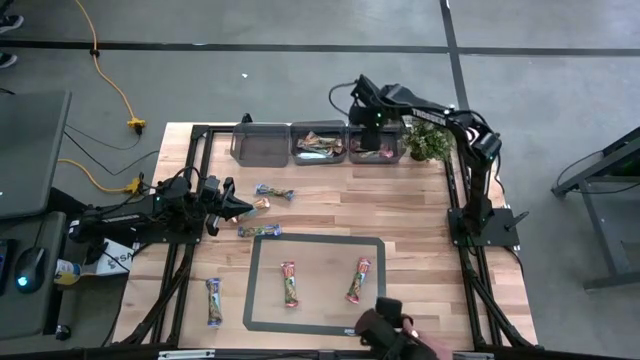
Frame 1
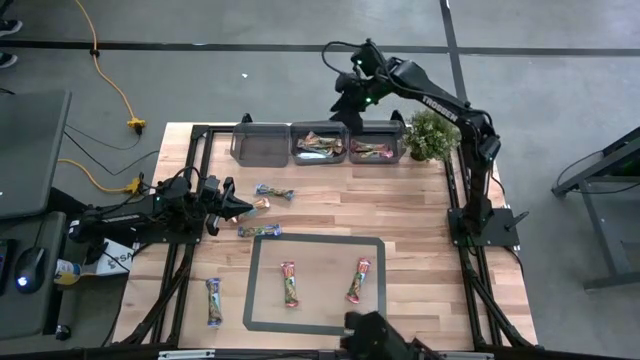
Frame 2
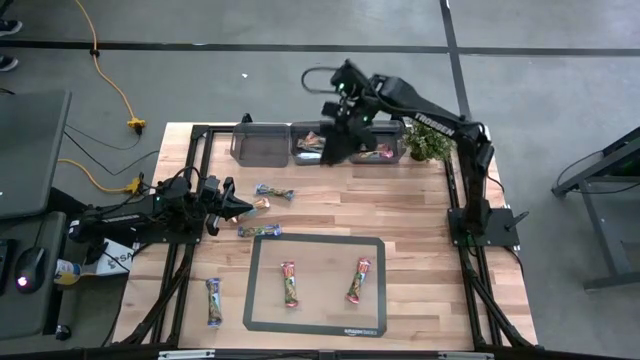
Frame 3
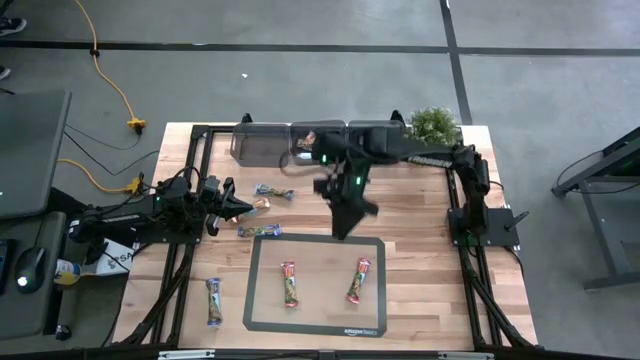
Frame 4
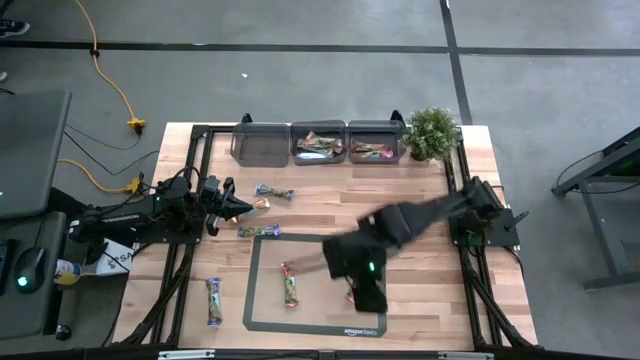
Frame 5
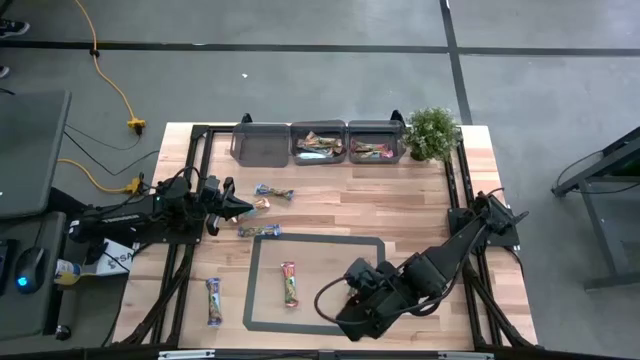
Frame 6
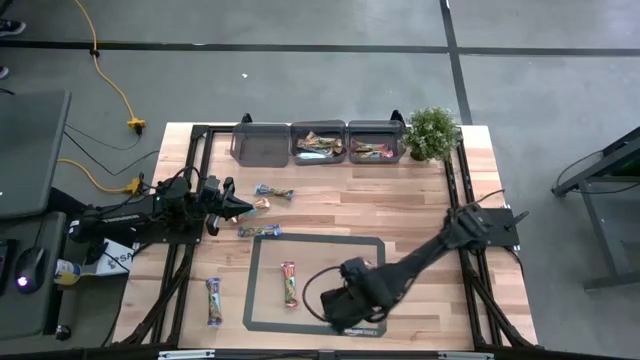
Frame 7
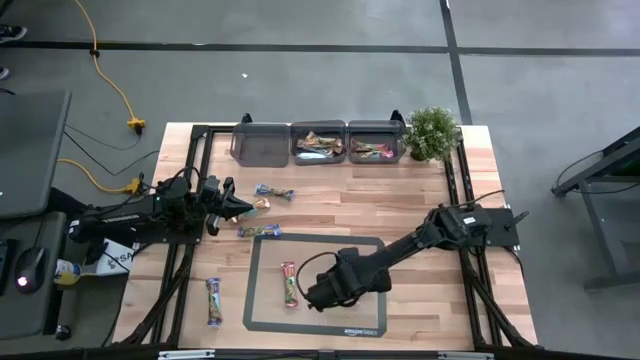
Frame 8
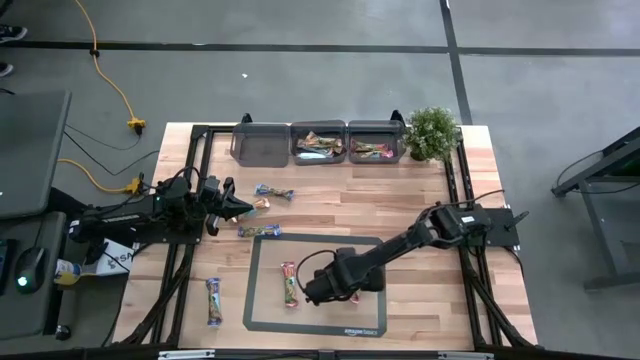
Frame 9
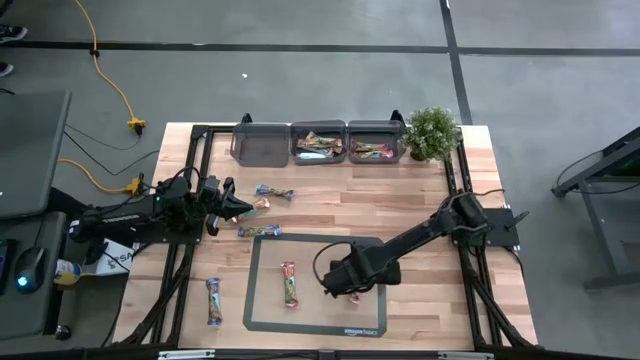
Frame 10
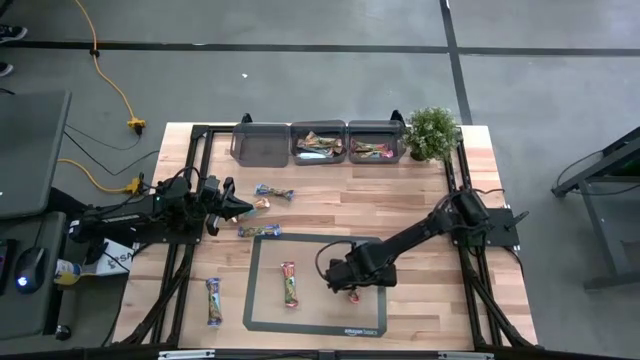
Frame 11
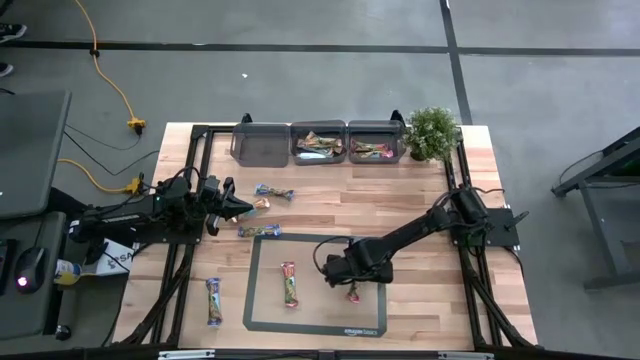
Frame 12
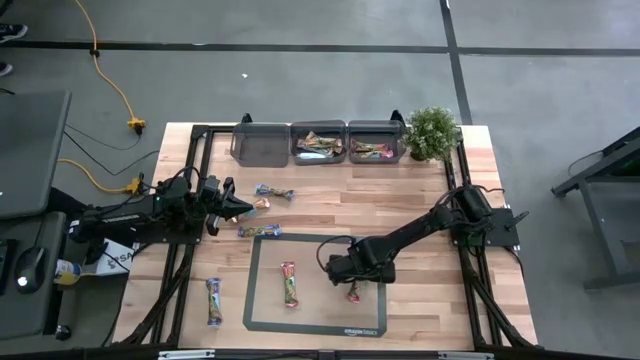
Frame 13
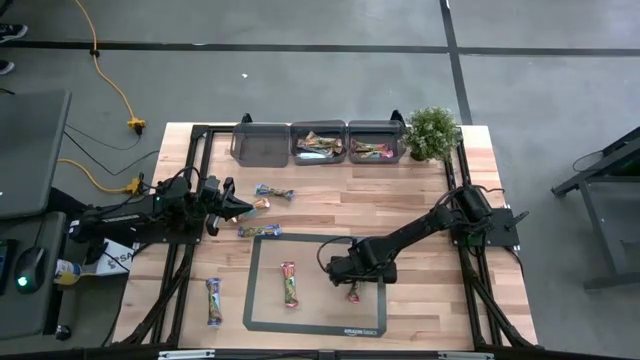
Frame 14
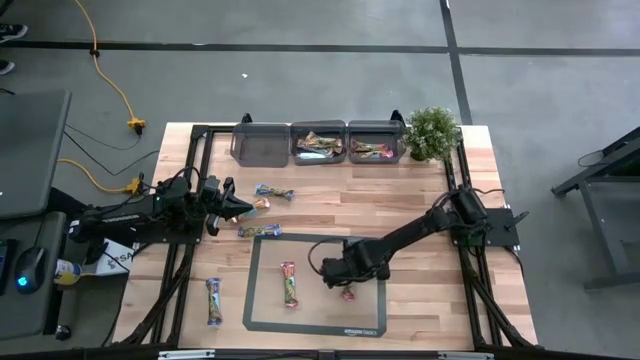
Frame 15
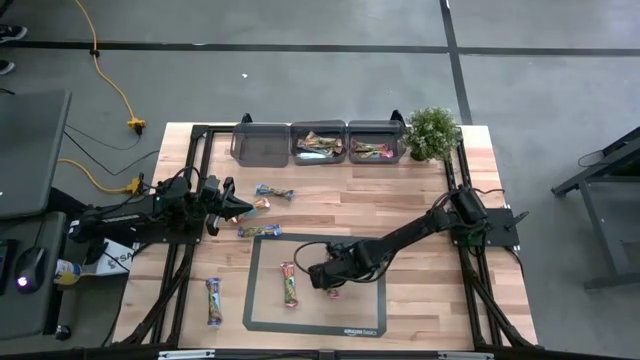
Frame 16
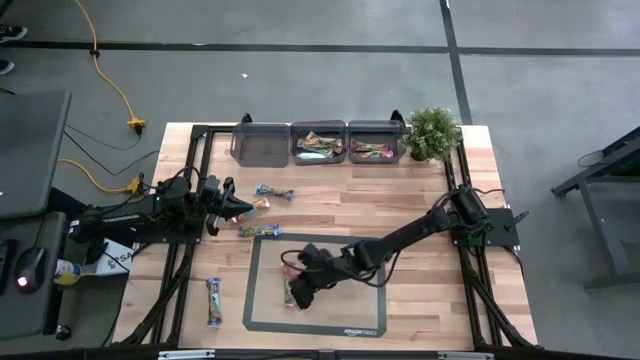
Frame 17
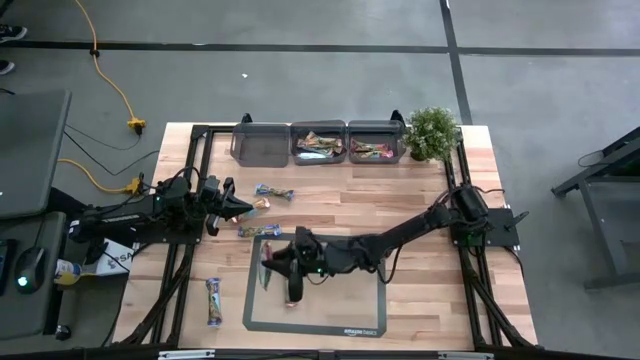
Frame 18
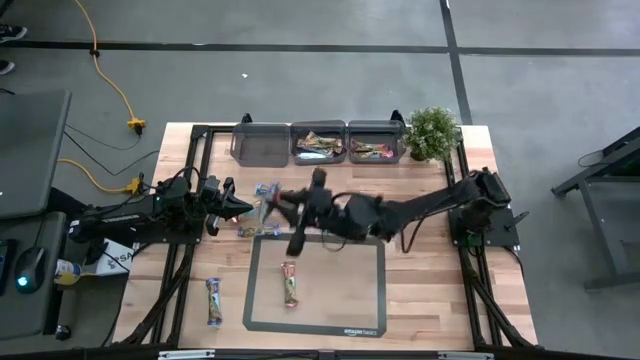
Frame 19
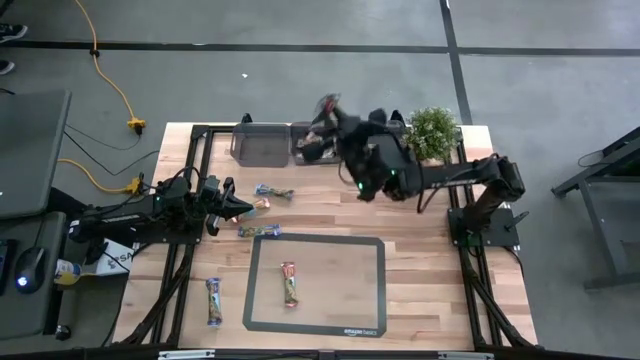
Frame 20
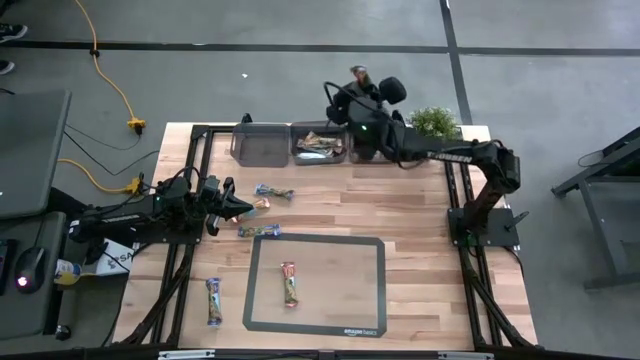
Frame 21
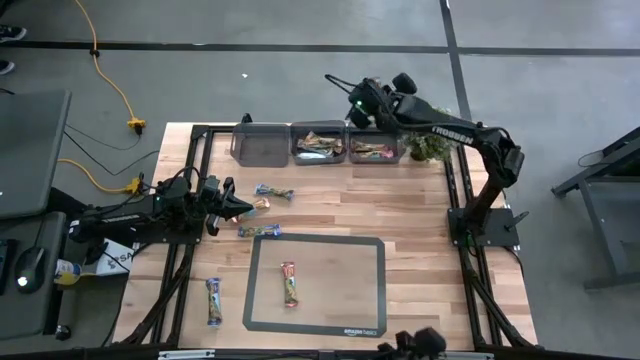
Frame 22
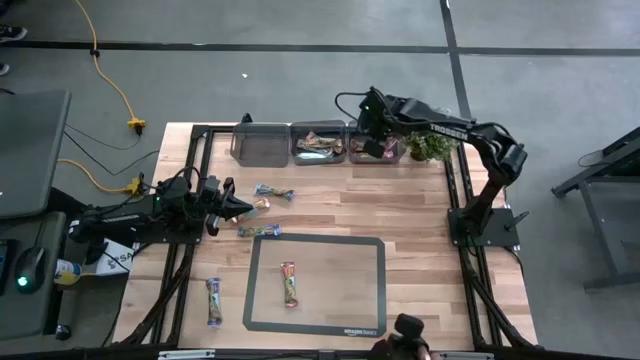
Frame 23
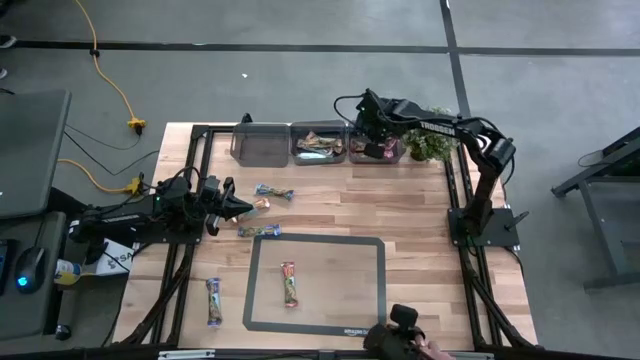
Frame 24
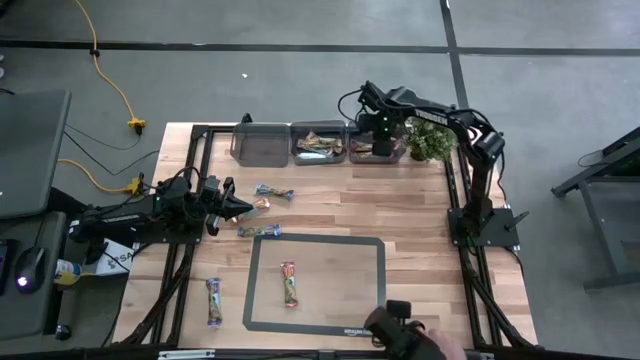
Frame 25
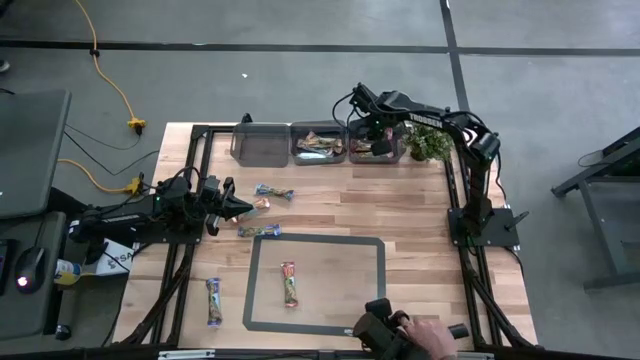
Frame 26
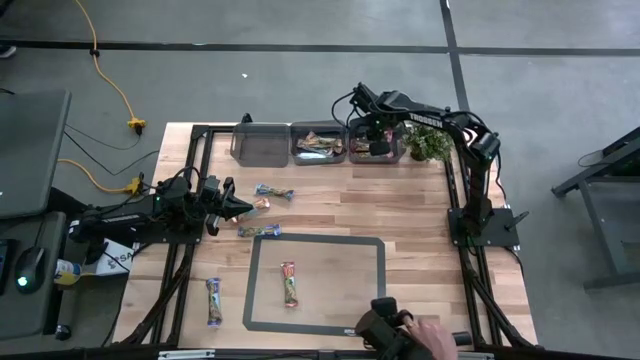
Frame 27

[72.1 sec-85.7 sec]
Task: Pick and place Granola Bars by type
Put the red granola bar into the right black bin

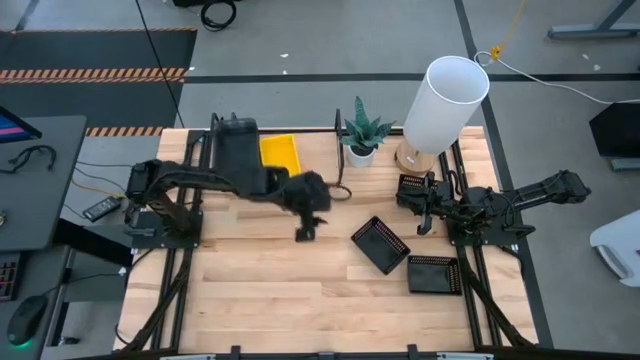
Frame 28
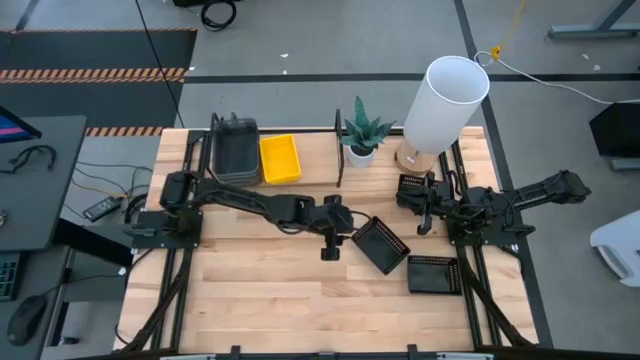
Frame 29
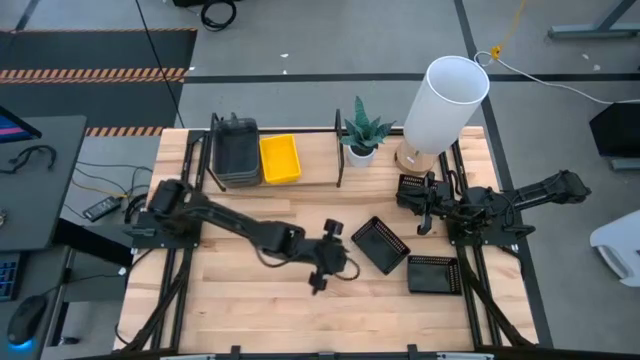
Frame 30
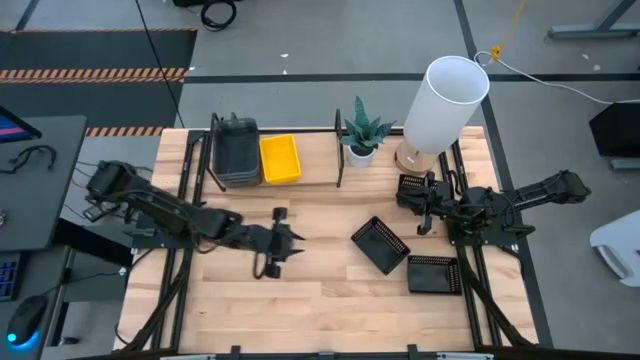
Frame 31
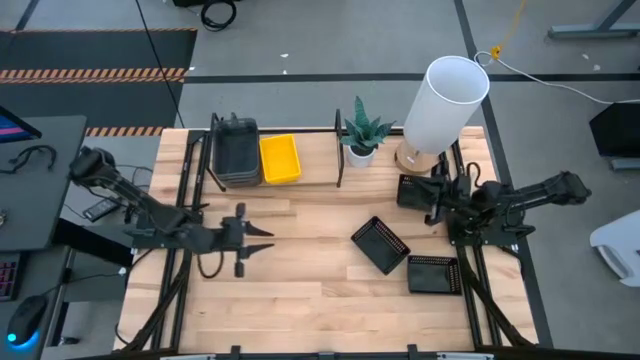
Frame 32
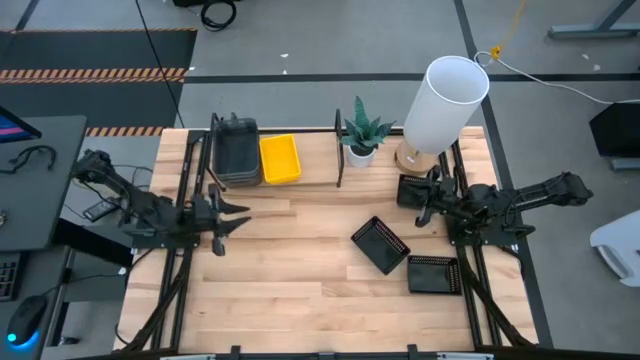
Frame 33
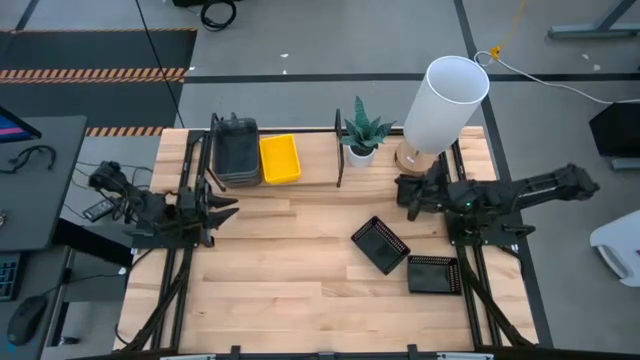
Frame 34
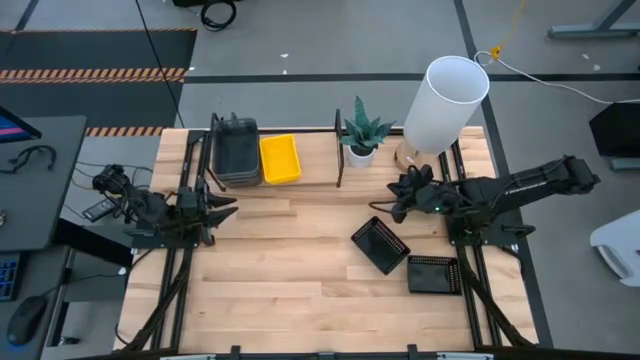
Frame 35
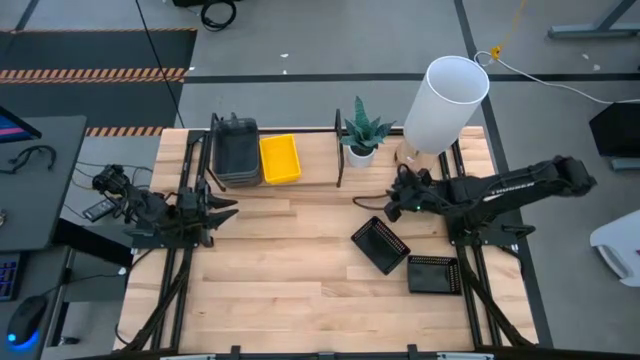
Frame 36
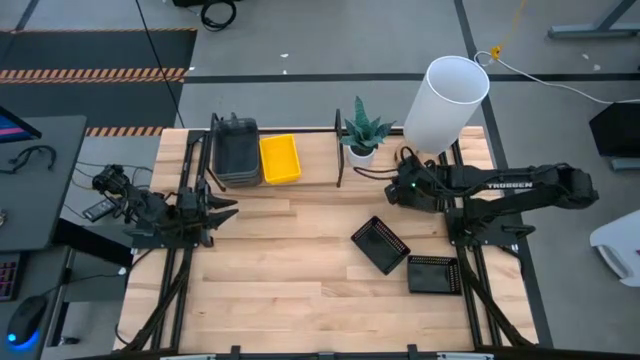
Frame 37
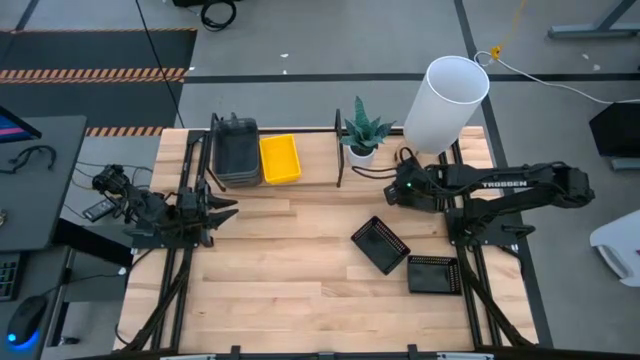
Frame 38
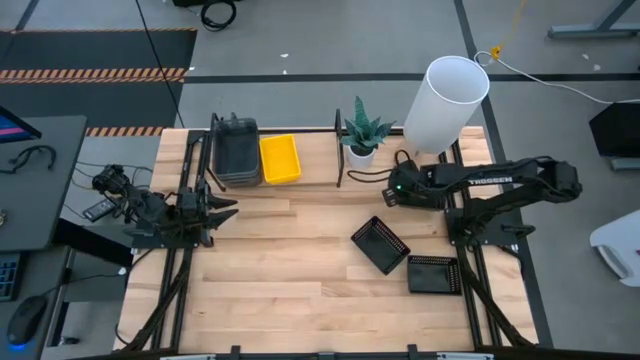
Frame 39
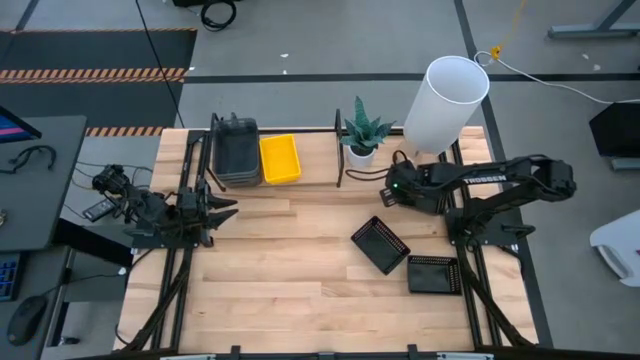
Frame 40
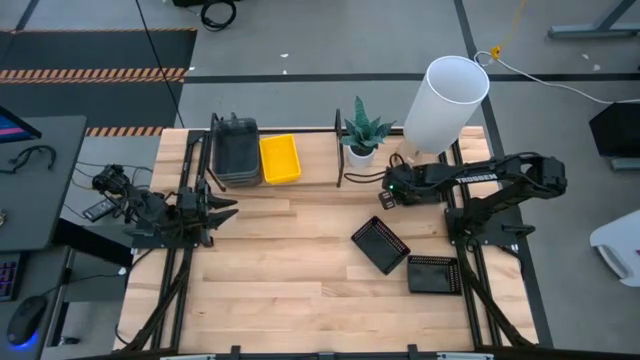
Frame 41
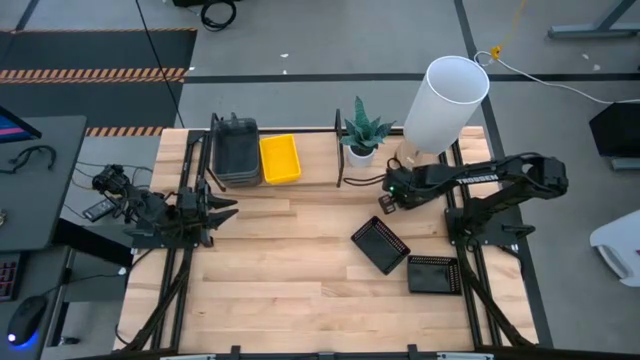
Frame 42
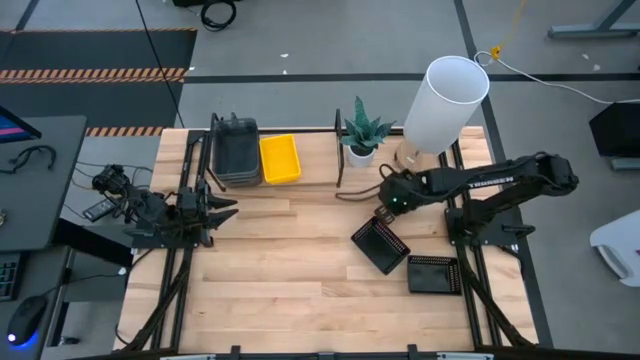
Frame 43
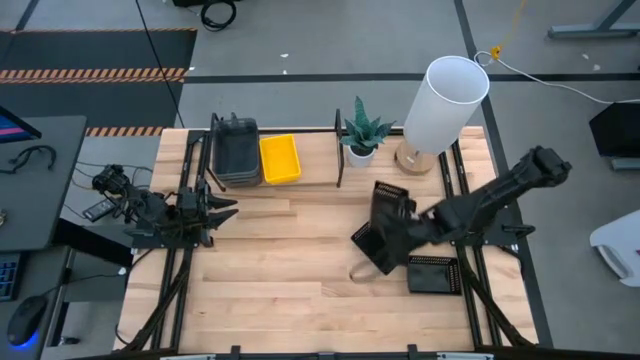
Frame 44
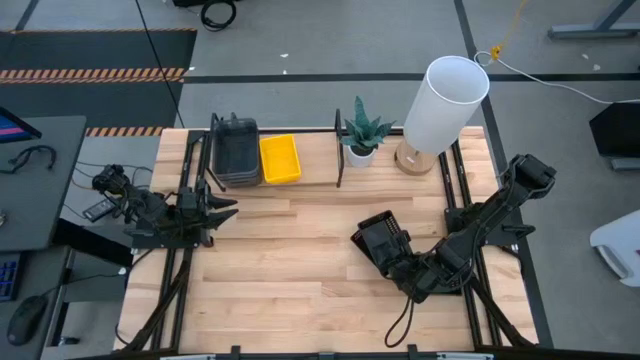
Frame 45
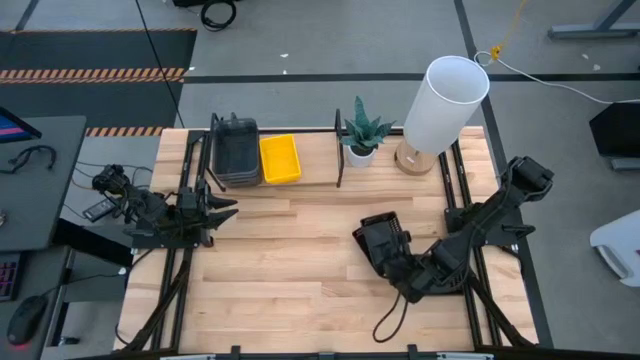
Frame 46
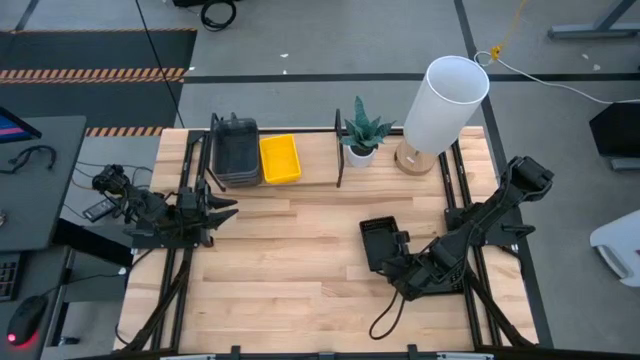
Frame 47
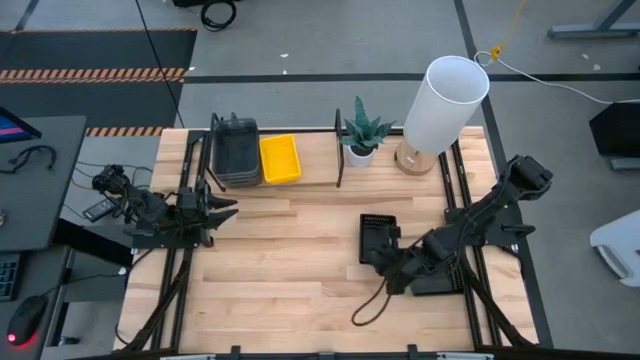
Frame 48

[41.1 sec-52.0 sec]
Task: Stack baskets on shelf by color
Stack the top black bin on the left black bin
